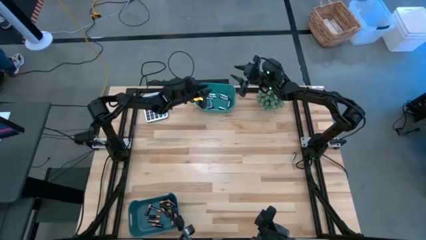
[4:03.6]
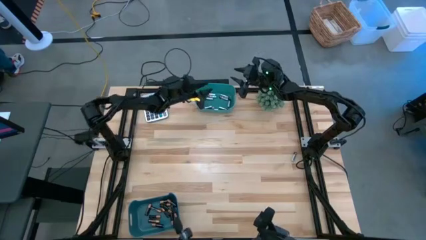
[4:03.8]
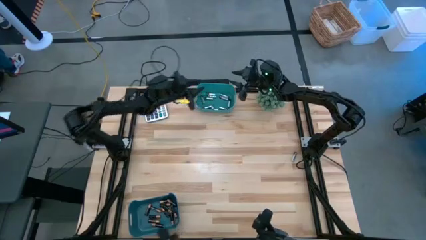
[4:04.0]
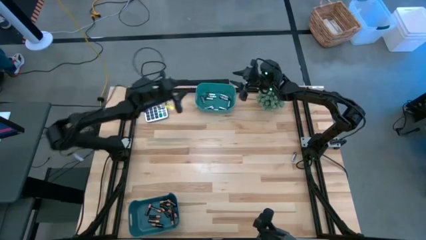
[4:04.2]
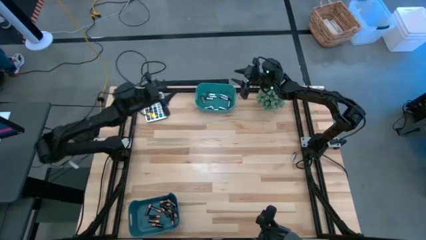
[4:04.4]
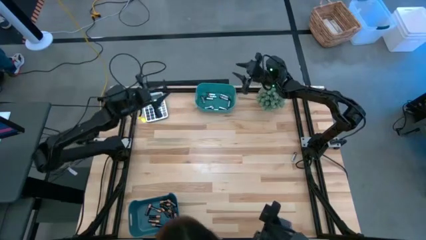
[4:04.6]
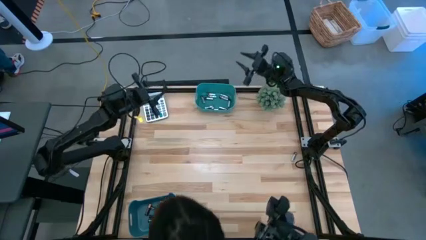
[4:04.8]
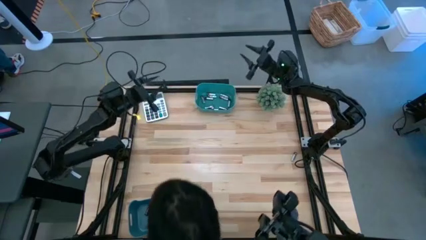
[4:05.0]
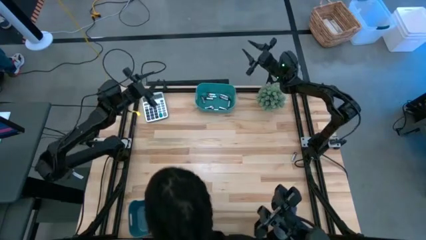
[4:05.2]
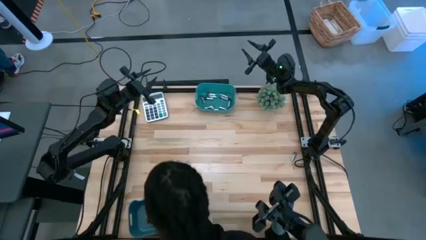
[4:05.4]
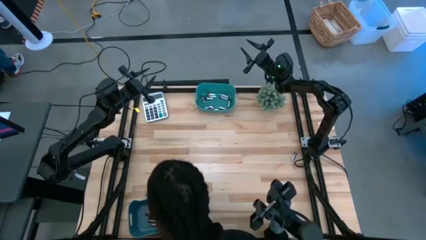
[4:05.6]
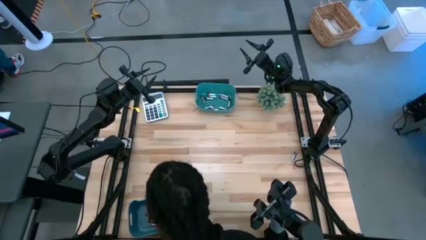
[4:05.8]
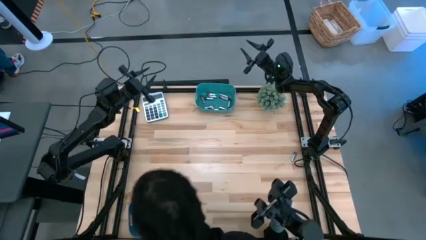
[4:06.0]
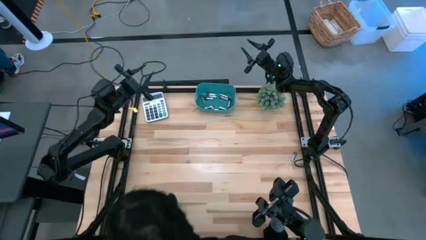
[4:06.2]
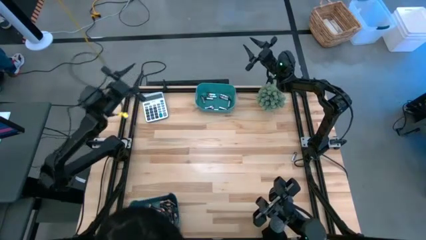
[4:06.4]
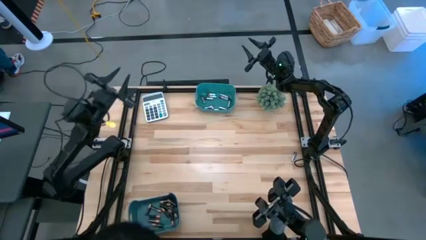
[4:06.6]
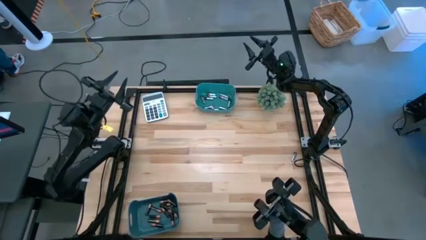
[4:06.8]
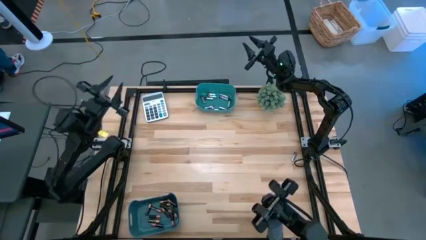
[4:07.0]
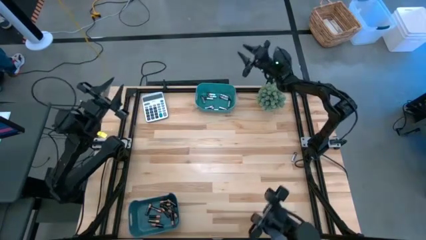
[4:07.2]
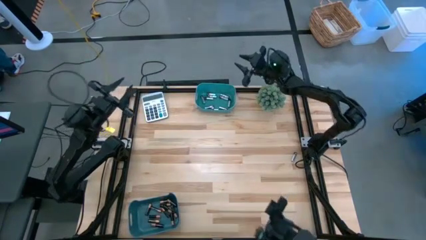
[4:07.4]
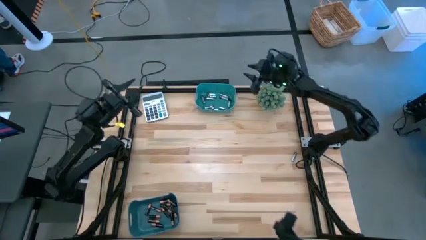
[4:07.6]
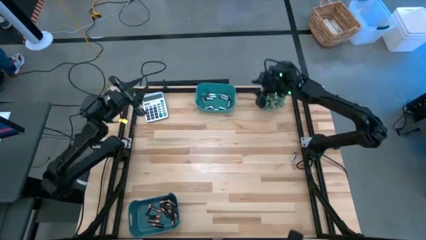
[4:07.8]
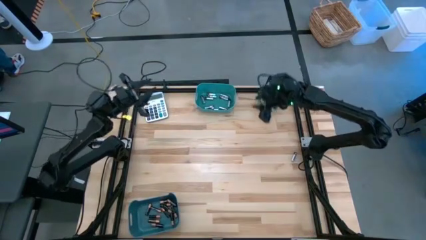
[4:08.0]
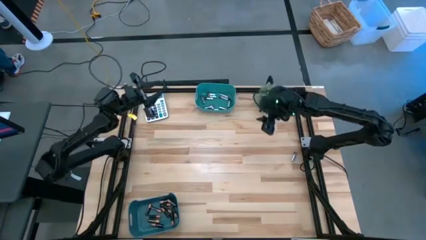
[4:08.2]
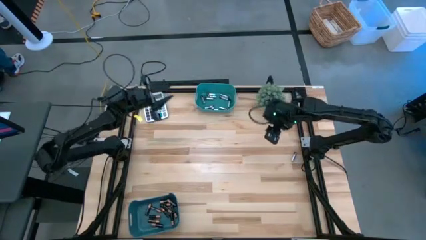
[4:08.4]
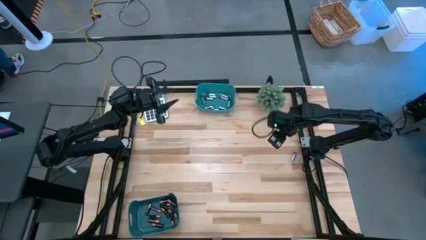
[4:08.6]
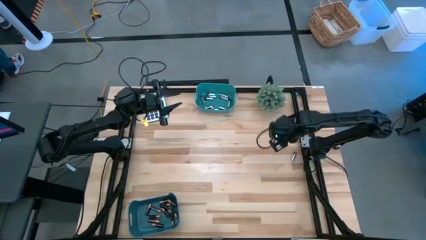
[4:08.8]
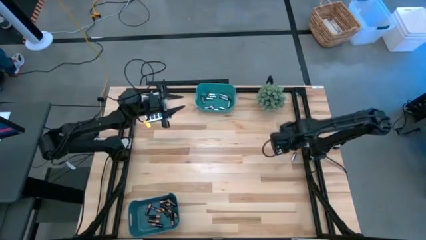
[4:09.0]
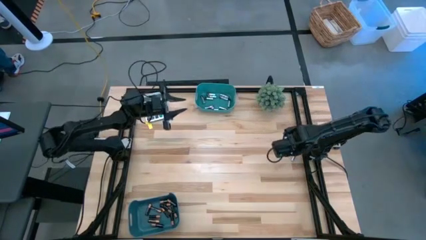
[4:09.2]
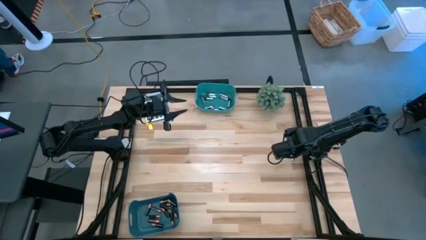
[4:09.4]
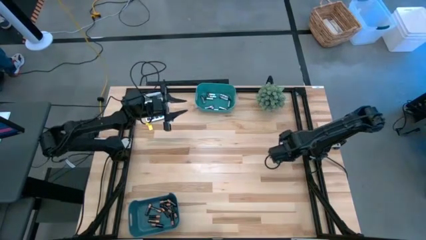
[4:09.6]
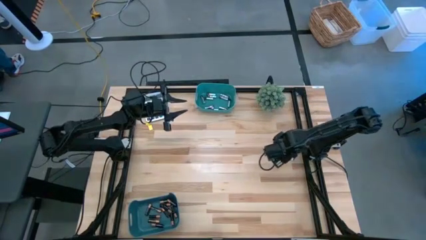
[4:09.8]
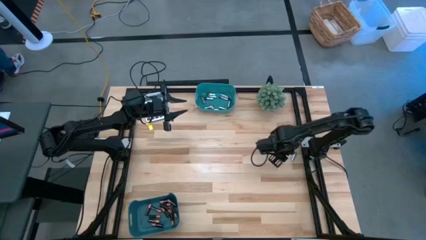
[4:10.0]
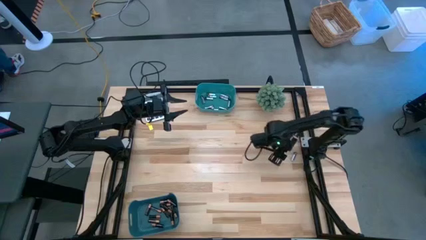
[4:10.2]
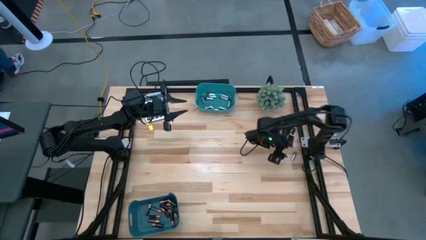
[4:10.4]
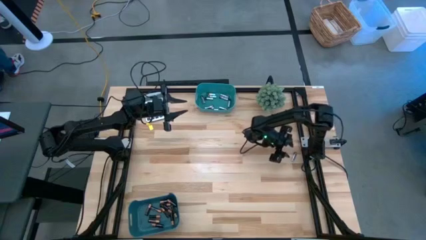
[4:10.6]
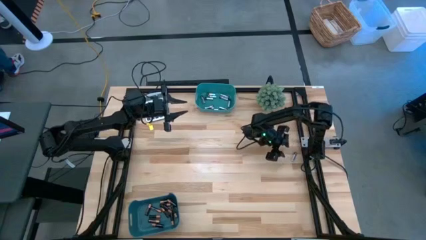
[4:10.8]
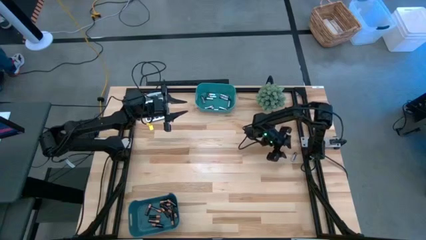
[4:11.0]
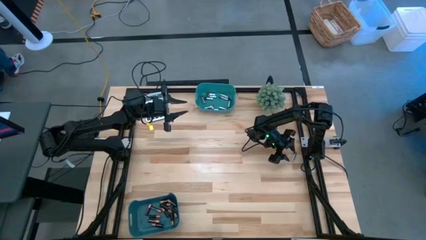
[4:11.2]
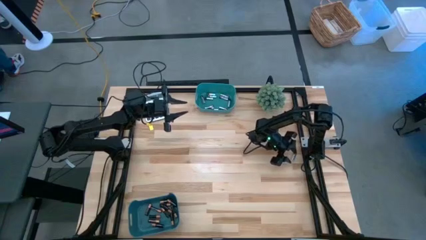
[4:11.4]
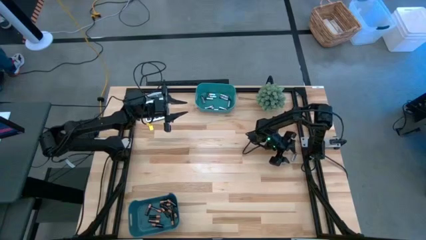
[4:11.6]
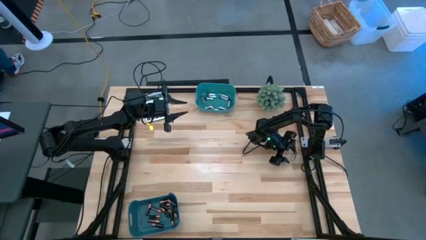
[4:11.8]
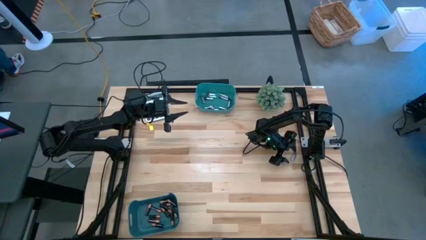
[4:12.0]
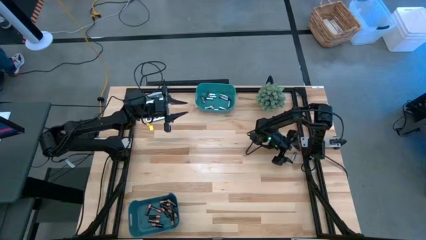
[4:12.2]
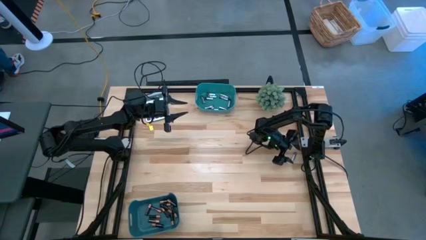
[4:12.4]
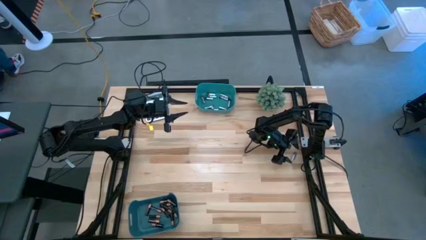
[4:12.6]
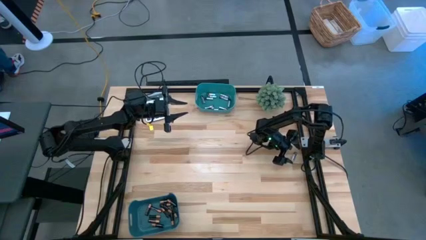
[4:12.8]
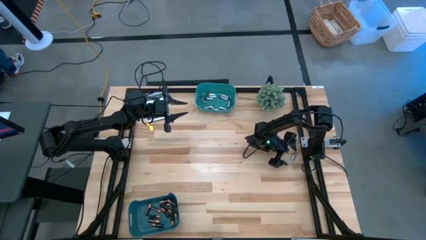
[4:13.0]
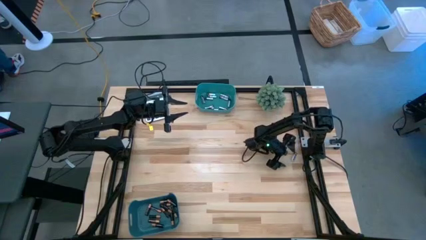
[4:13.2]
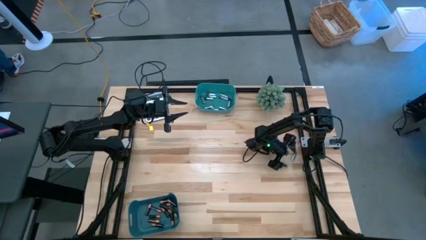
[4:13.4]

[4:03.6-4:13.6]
Task: Sort batteries
Put the battery into the top green bin

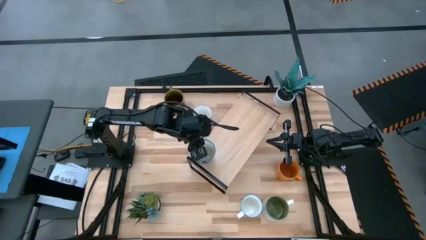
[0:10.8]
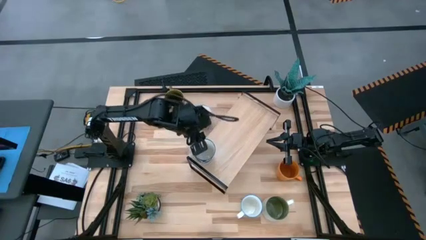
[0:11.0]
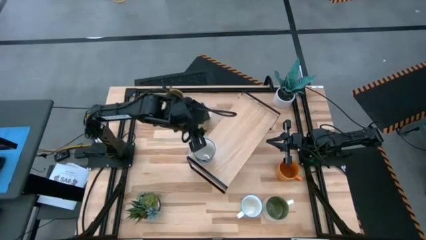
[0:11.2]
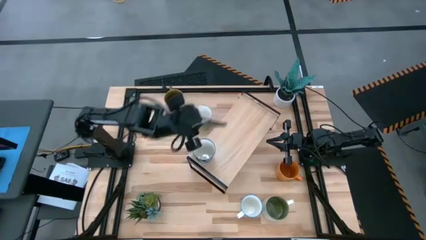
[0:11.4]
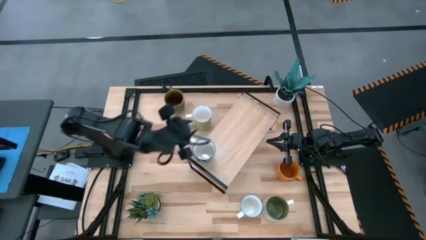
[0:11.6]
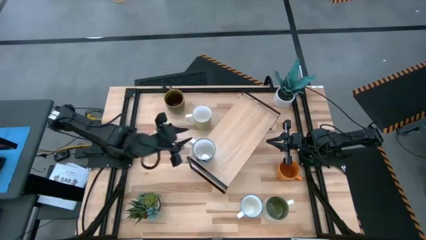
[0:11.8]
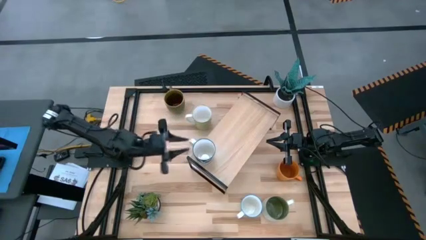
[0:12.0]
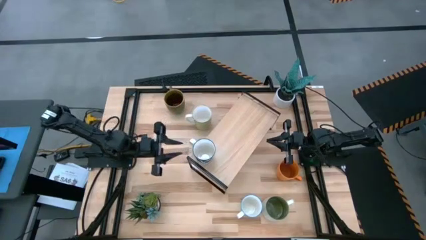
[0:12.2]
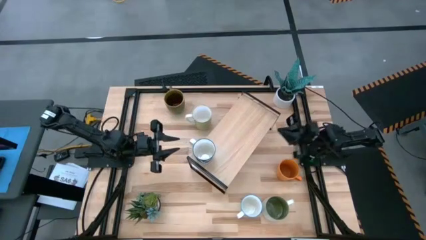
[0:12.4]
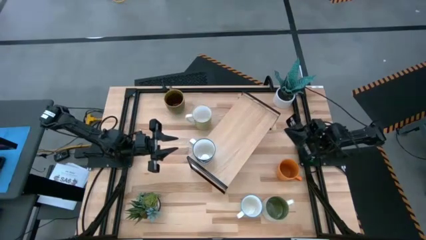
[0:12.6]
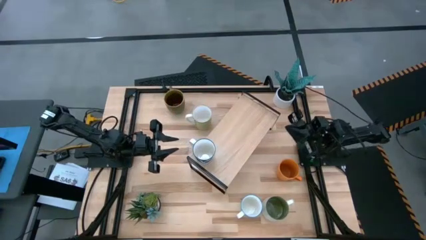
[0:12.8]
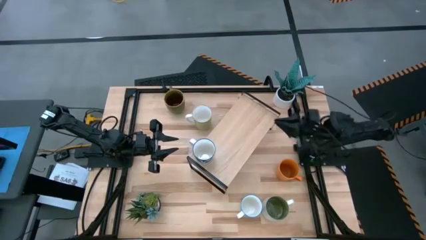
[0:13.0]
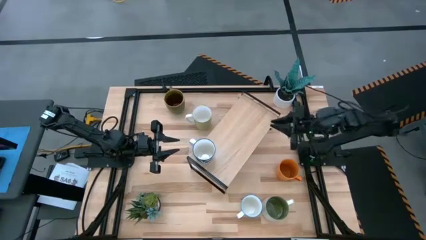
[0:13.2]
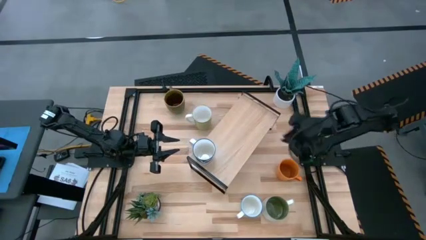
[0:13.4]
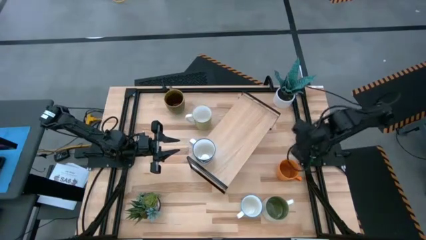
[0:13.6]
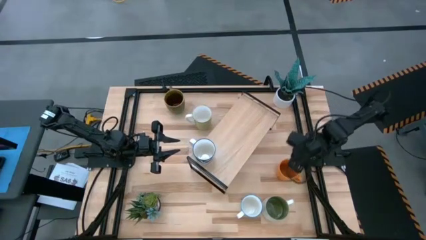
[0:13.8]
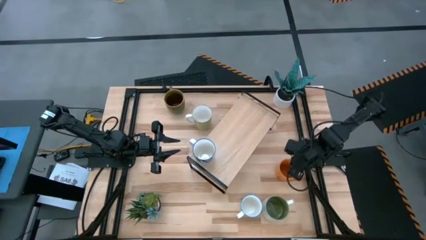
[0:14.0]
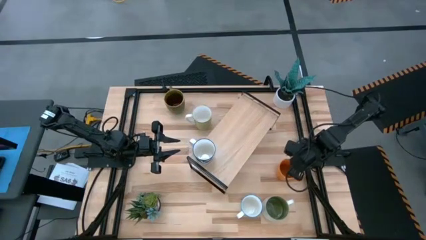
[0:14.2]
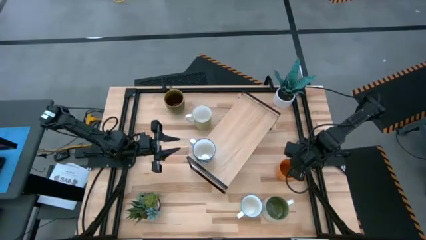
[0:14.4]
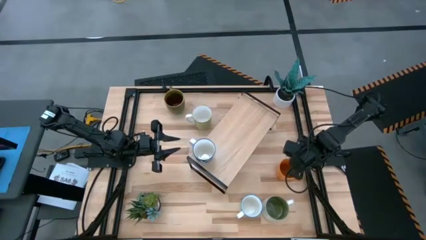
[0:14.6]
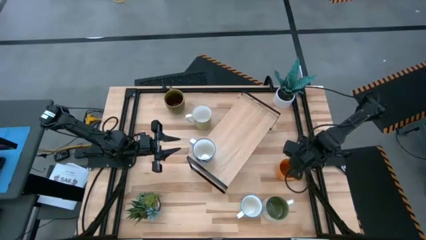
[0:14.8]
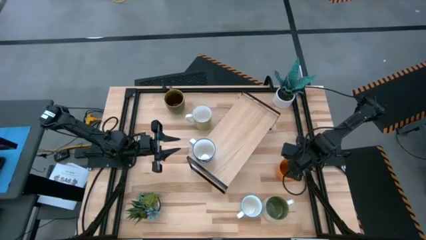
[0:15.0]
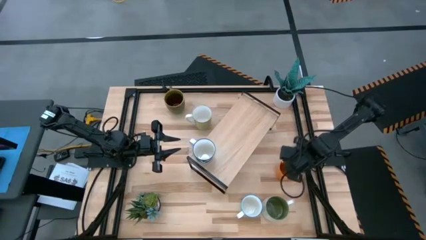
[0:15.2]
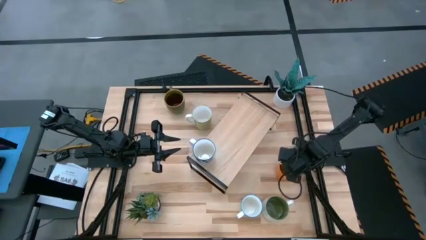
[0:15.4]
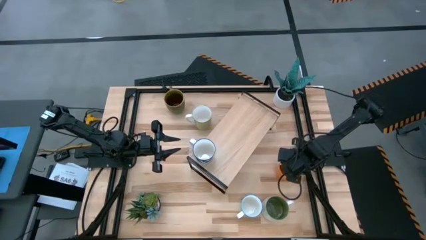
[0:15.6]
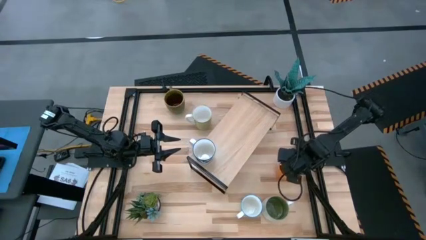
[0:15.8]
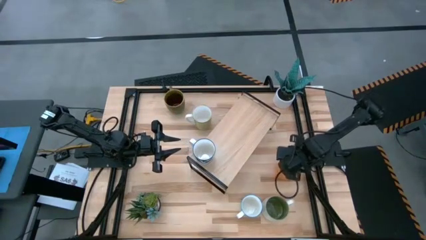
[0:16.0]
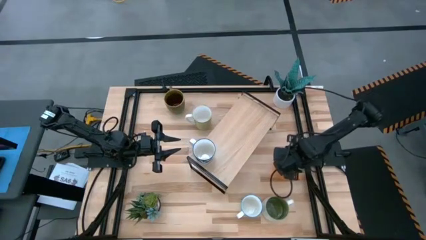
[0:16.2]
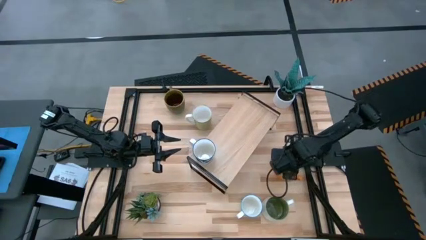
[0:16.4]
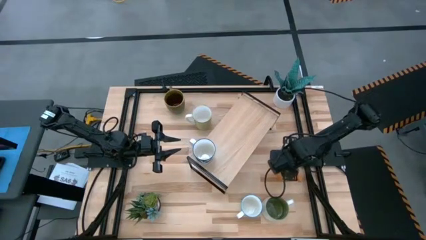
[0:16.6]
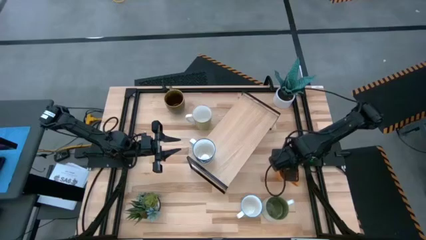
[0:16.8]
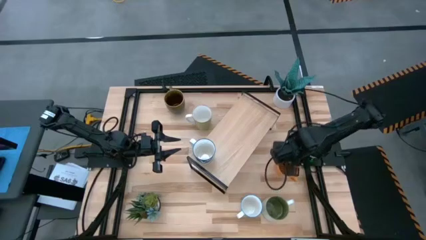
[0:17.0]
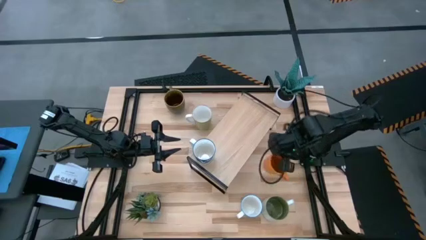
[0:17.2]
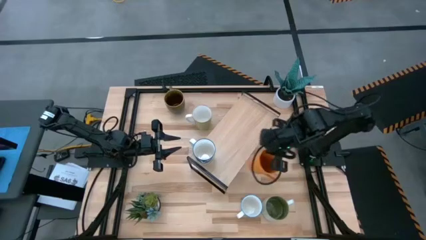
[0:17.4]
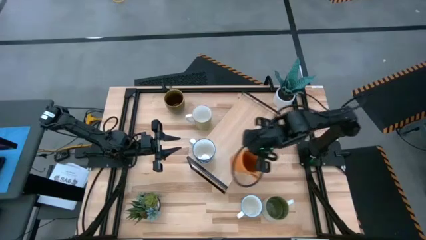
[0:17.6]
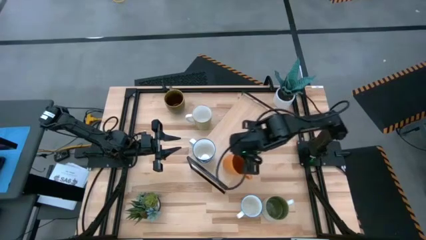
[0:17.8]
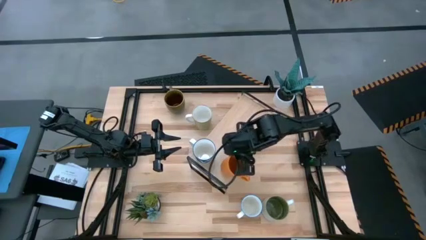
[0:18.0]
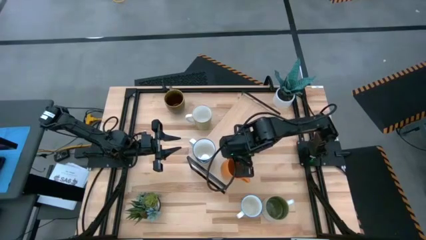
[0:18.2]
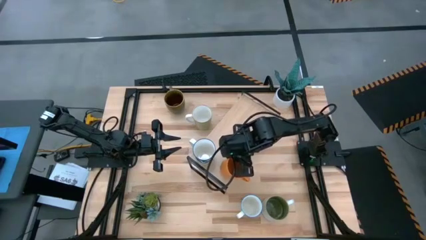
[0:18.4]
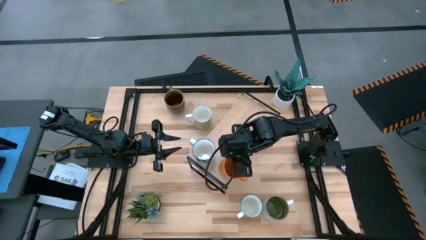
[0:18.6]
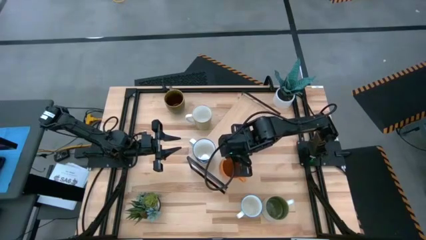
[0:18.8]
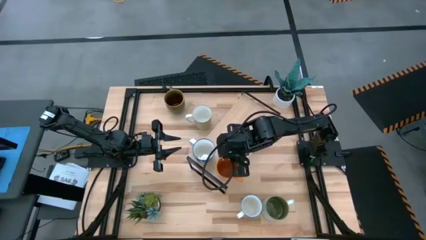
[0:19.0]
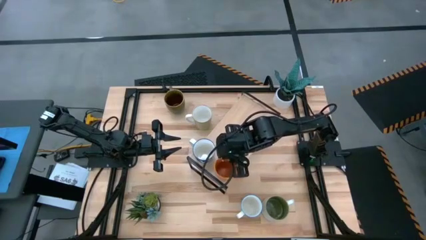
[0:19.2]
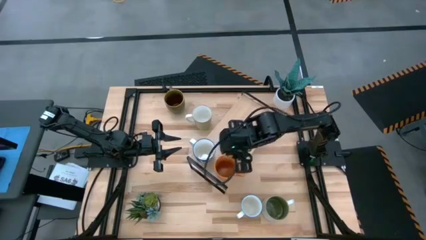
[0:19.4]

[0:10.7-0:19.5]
Task: Place coffee mugs
Put the orange mug on the shelf
